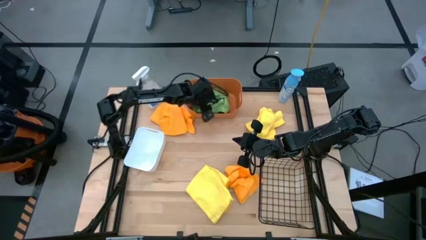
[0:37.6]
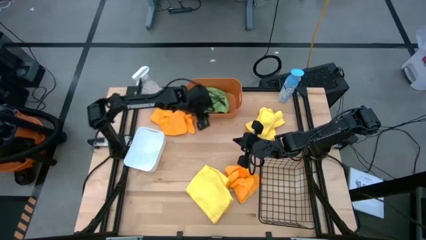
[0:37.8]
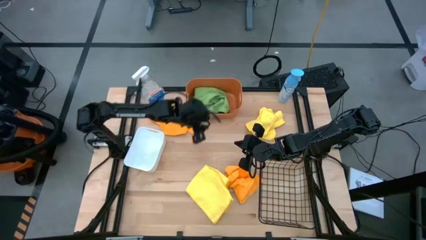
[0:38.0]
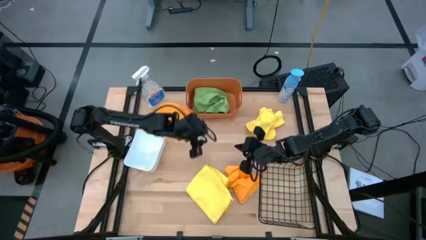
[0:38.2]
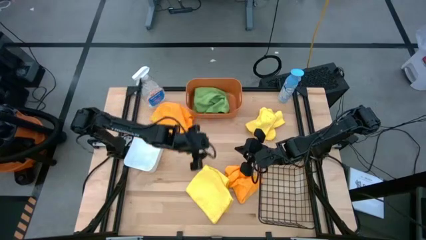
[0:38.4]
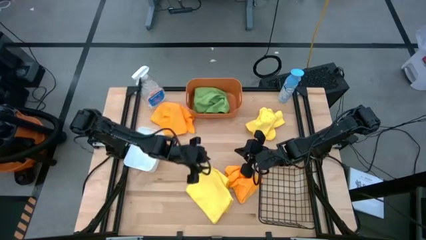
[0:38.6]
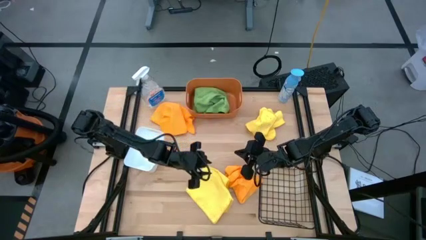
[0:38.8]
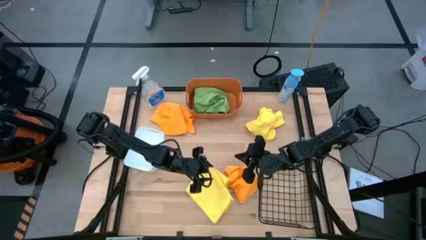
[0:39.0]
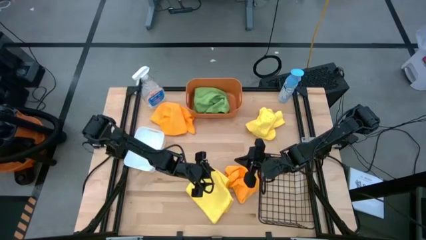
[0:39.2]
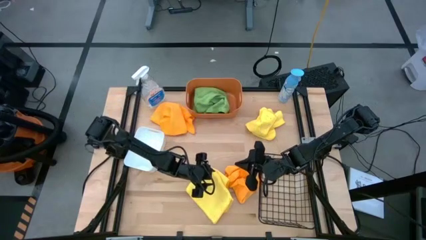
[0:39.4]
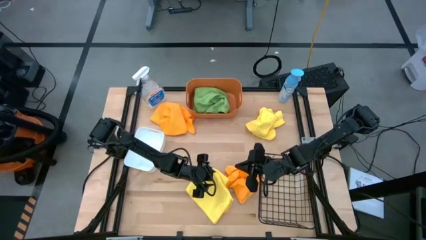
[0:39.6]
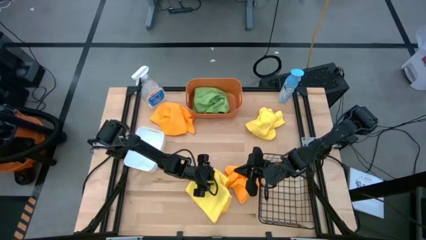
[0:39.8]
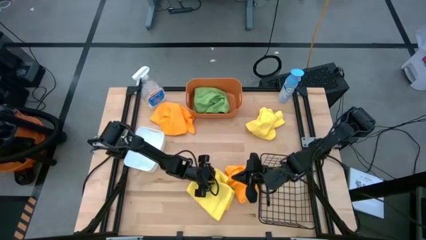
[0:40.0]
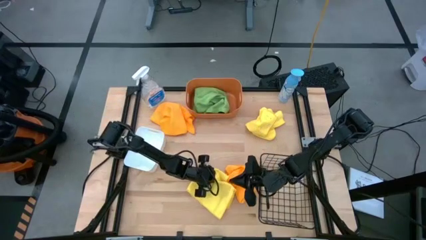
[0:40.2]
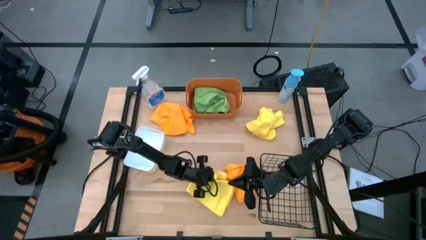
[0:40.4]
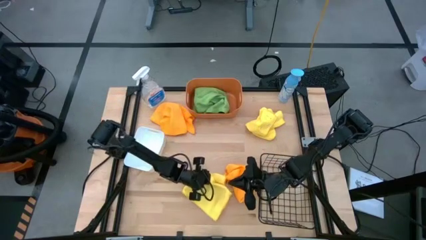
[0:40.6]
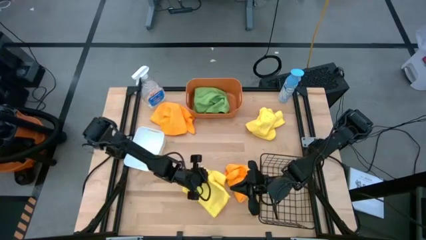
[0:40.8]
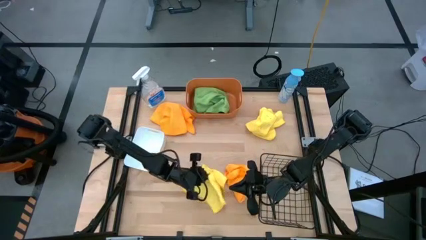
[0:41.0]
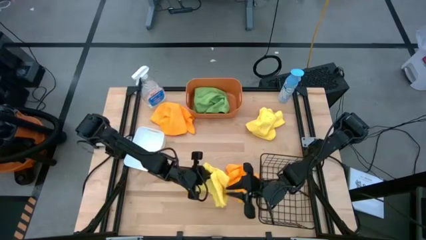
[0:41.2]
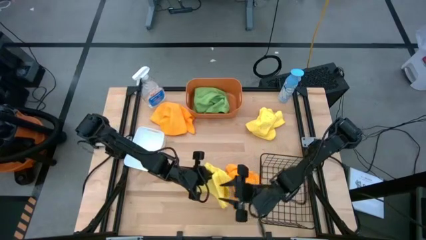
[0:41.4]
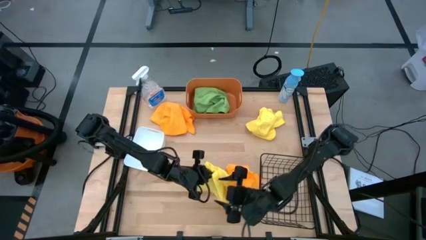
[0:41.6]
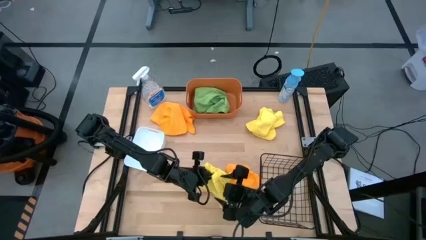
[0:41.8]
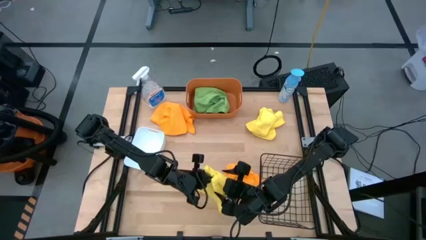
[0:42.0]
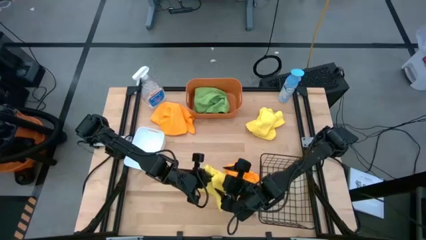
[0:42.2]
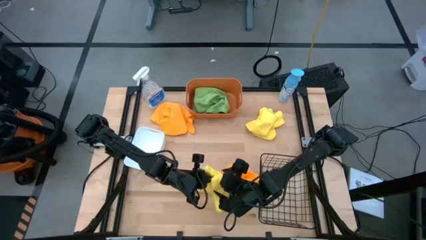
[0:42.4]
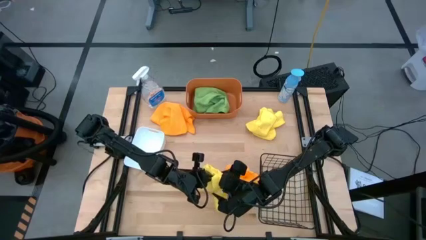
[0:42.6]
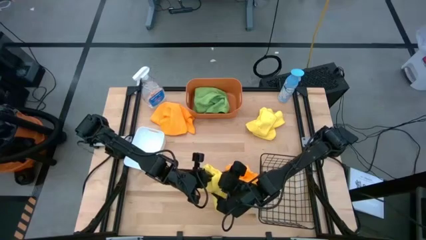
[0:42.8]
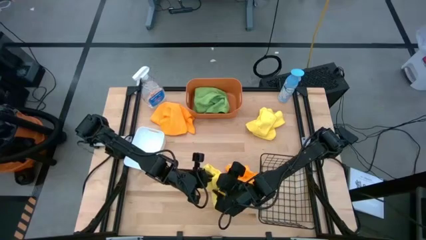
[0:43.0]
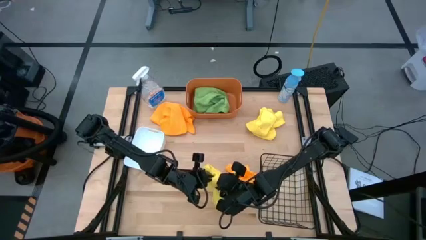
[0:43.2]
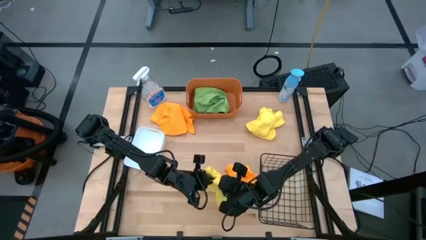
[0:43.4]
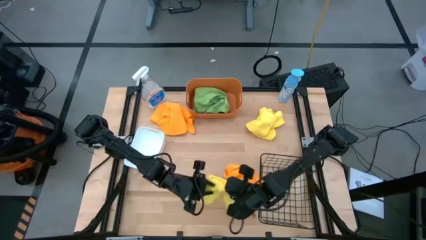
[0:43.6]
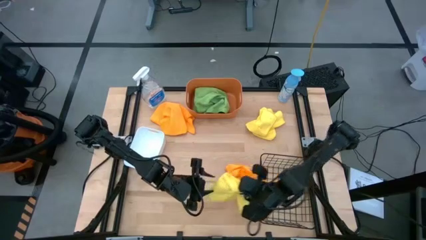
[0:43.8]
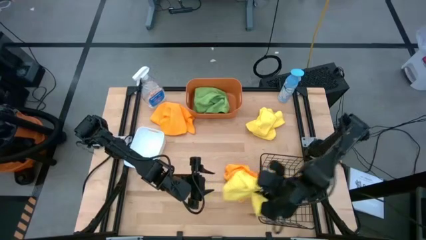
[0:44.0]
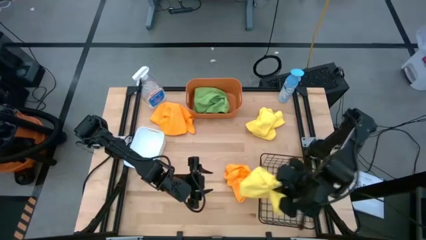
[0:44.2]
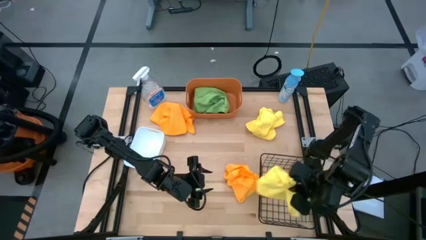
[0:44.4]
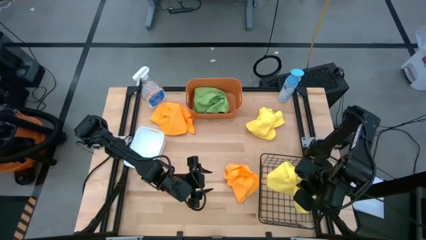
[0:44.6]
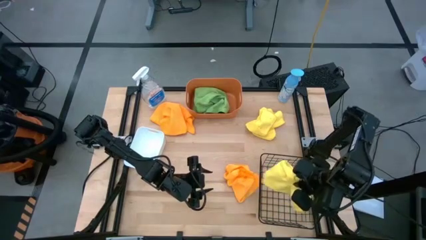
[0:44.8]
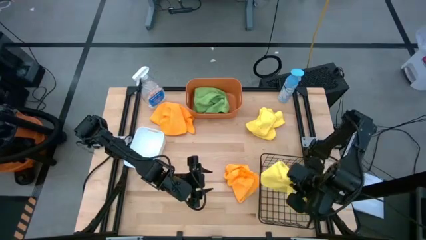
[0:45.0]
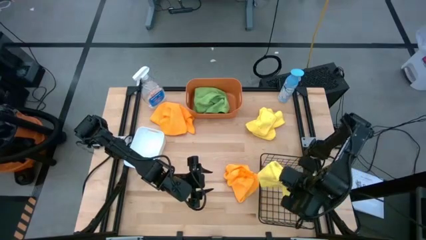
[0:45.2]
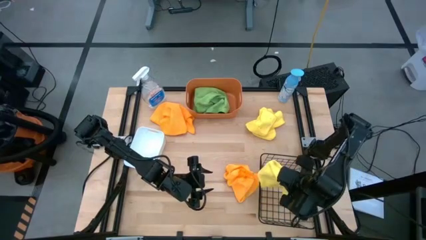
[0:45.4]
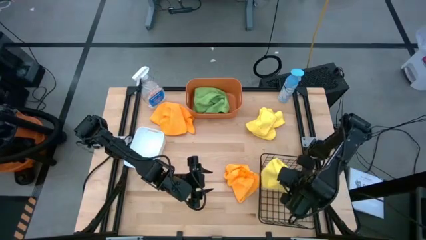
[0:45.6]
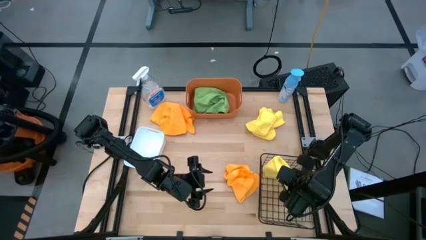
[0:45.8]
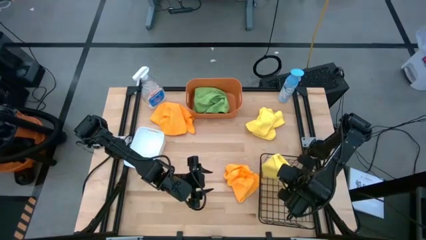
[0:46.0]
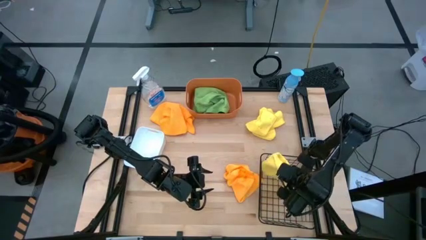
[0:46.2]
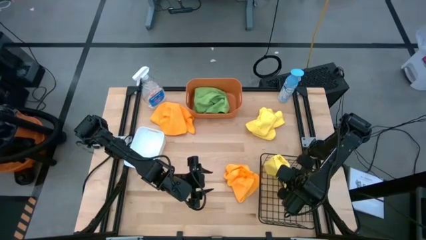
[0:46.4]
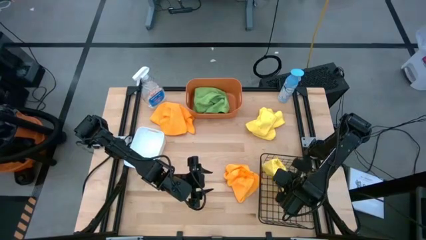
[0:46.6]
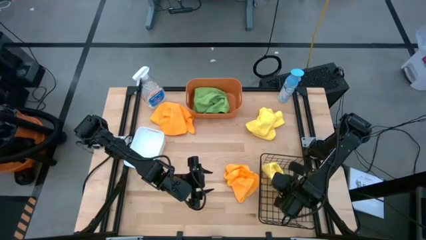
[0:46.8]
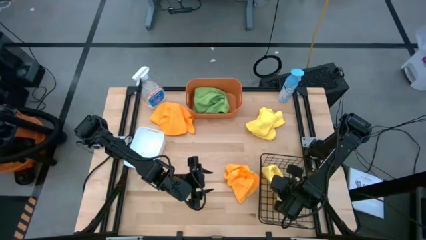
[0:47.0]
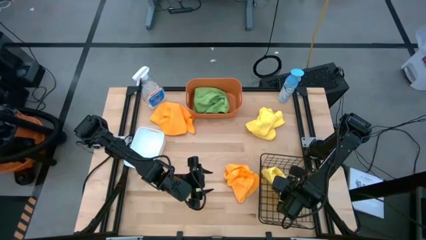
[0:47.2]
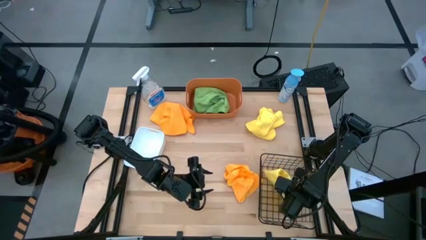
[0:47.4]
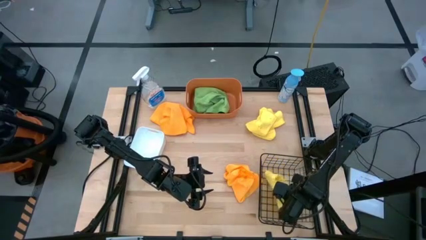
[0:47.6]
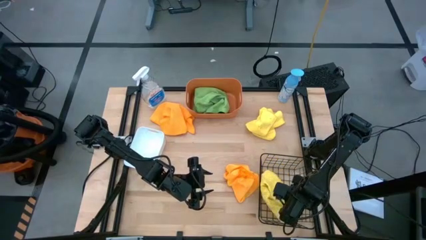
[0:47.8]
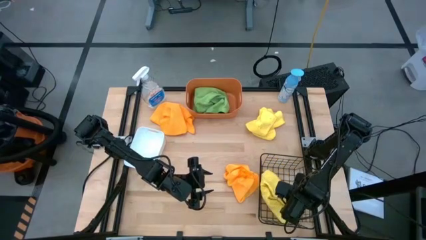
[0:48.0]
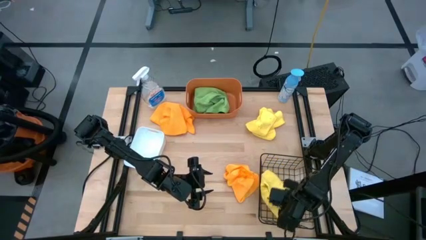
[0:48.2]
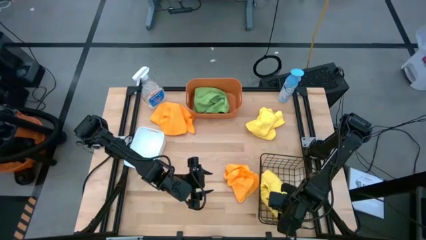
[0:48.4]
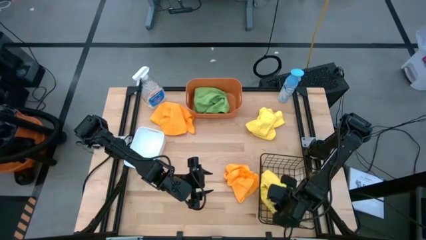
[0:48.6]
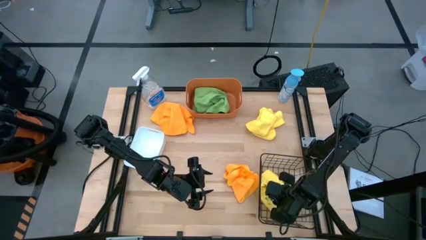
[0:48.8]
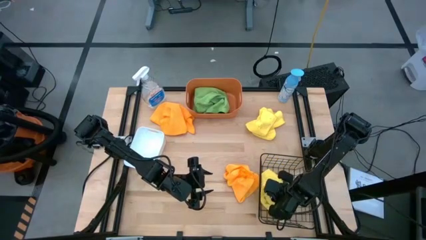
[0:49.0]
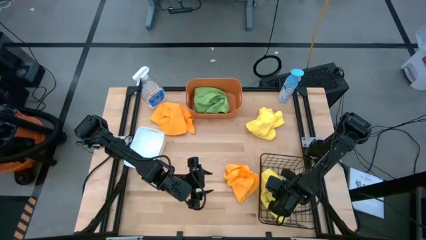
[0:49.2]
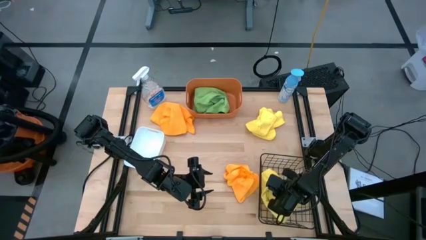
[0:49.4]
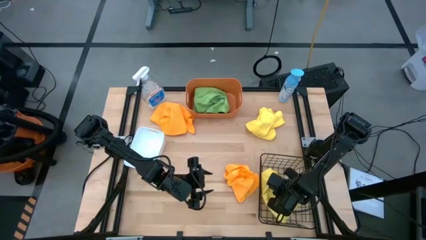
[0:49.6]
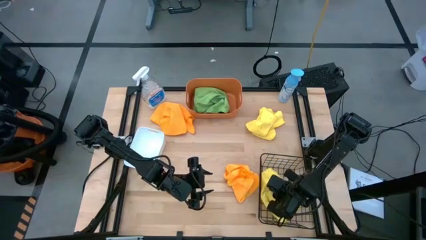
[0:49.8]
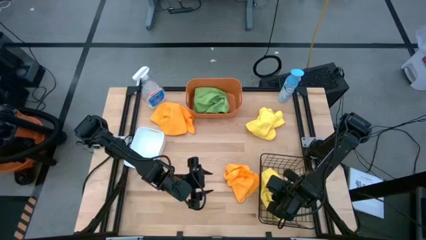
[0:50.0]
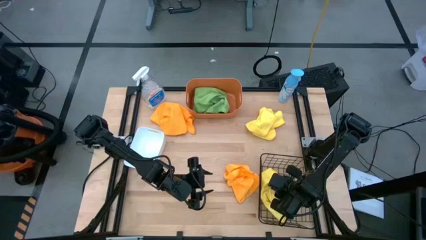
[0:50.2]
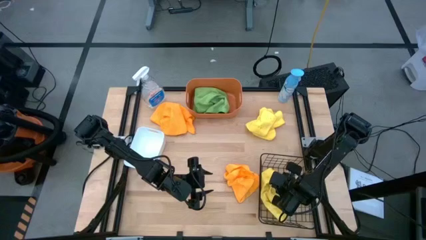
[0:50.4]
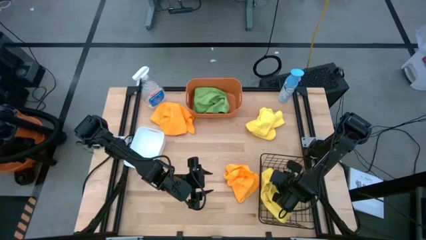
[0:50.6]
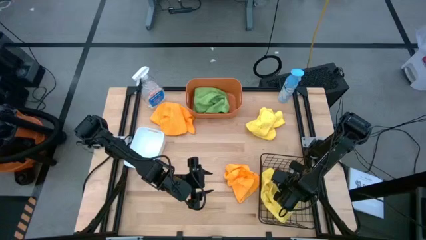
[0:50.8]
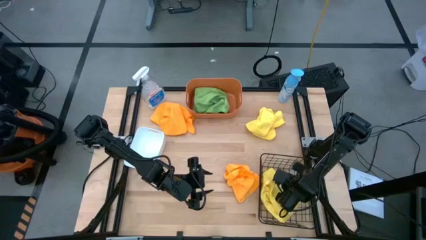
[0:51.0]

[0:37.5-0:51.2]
Task: Sort microfiber towel by color & place in baskets
Put the bottom yellow microfiber cloth into the black wire basket

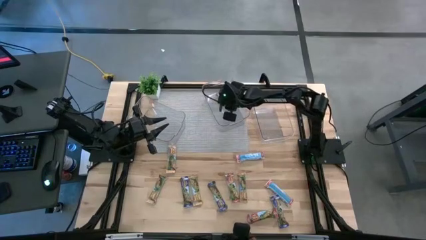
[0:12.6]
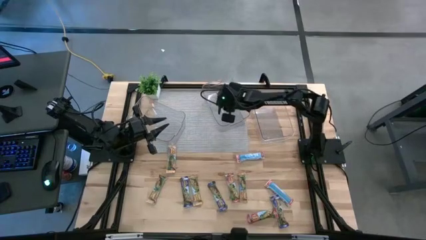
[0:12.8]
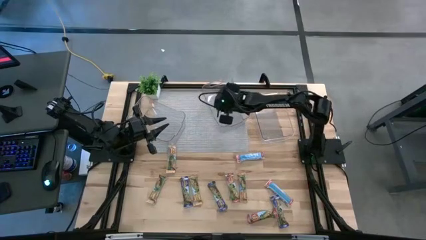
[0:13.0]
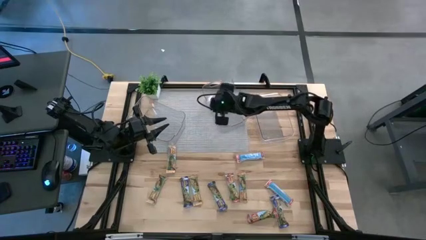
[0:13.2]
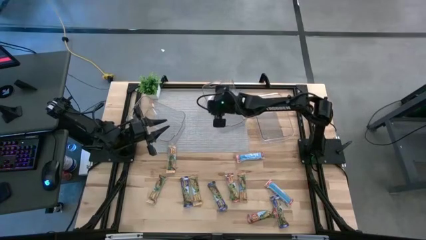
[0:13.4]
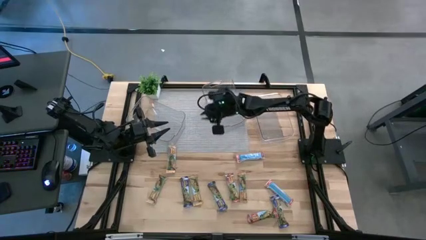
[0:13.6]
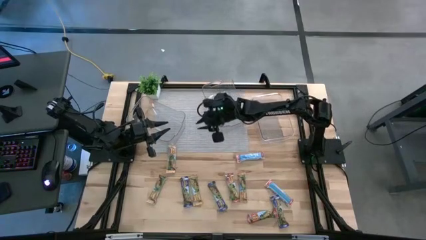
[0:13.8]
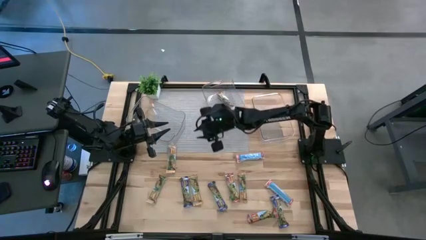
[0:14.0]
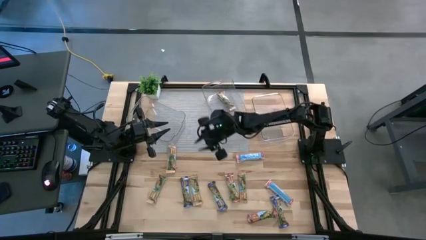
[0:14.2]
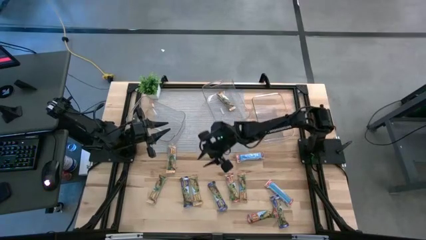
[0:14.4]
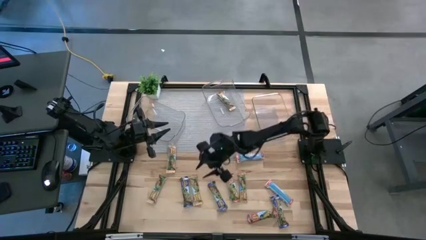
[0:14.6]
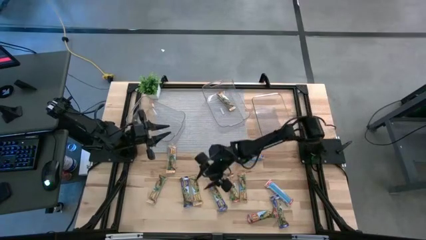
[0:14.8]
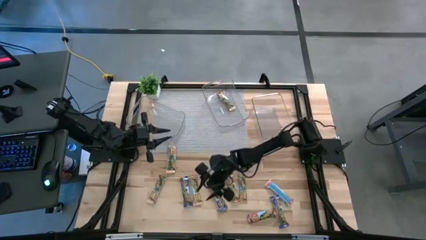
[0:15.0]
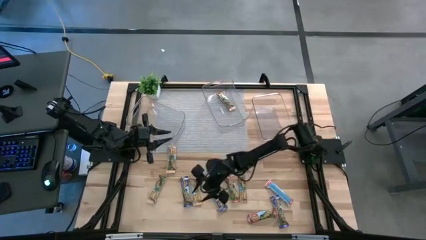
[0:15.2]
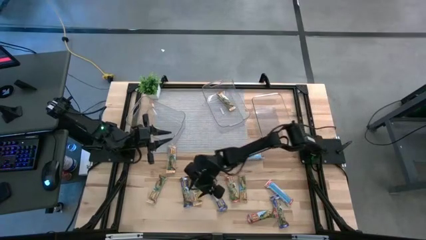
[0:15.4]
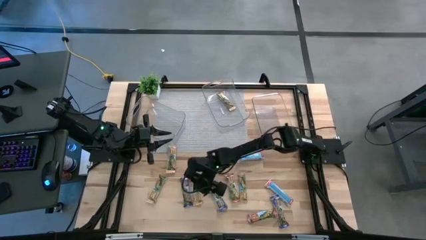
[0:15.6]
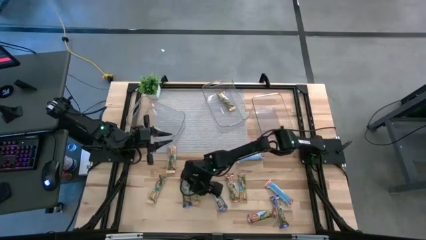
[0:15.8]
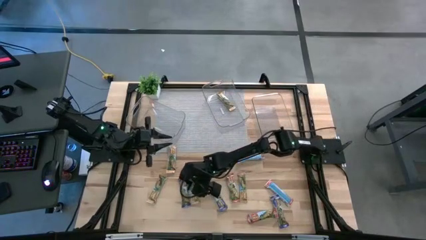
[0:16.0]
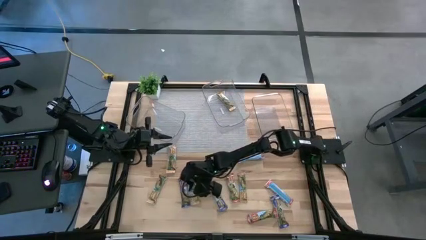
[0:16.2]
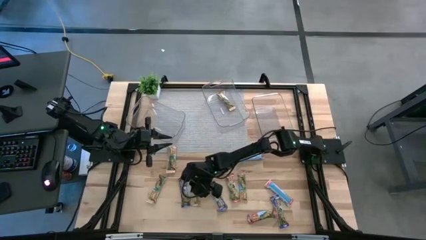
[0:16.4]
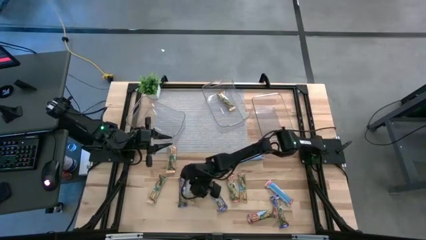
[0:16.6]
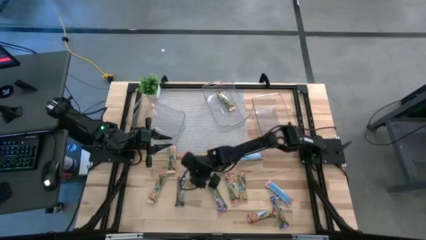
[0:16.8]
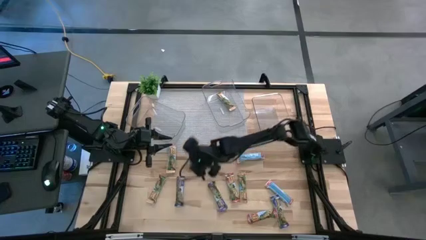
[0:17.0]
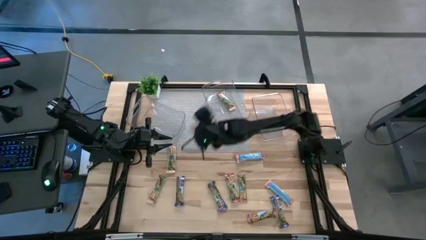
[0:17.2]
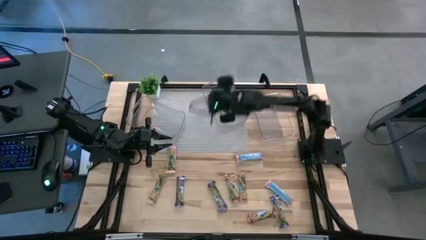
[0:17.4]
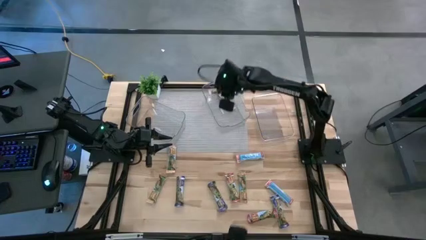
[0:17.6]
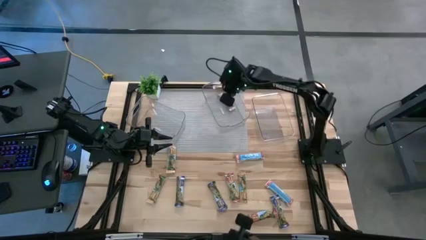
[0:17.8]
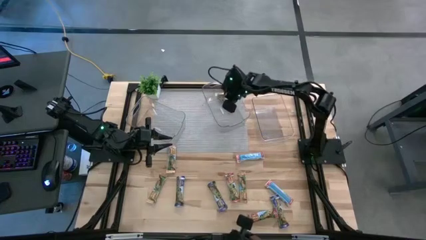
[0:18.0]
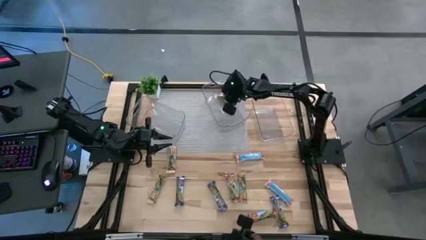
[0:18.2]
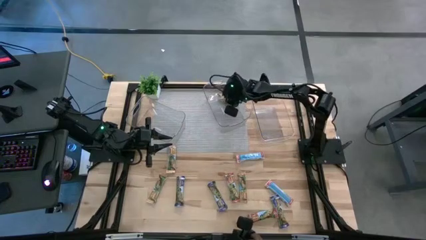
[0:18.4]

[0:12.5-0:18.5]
Task: Pick and place Granola Bars by type
Put the yellow granola bar into the middle transparent bin
